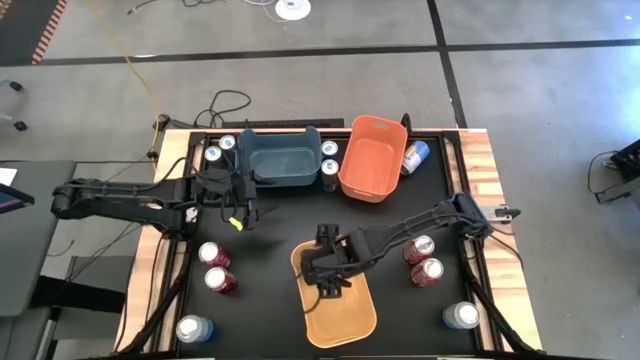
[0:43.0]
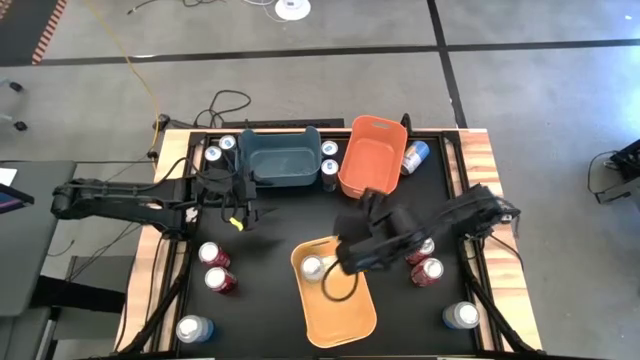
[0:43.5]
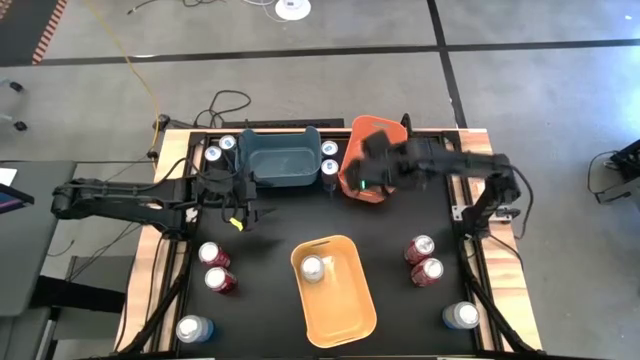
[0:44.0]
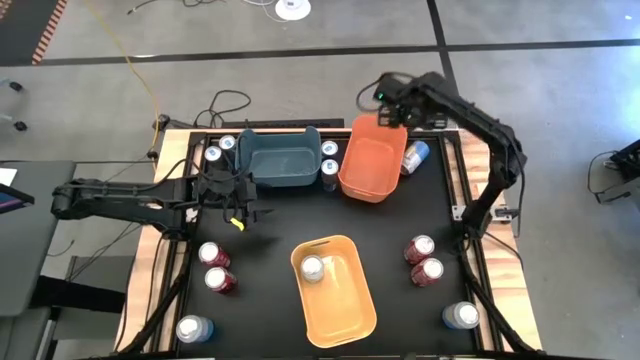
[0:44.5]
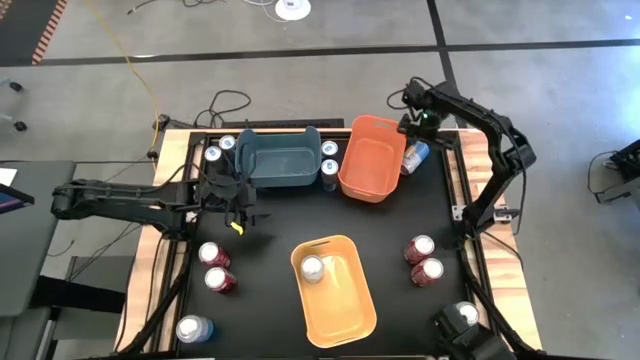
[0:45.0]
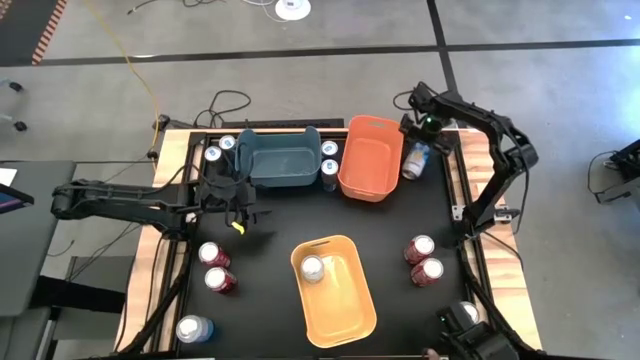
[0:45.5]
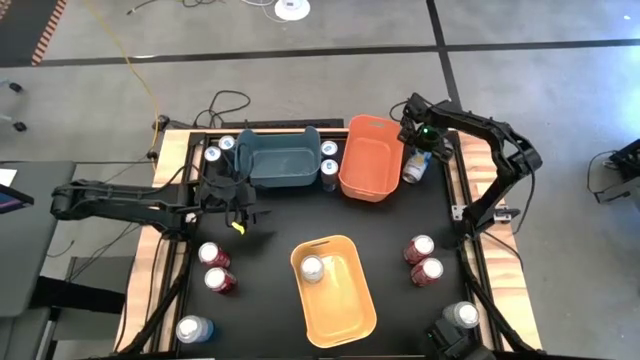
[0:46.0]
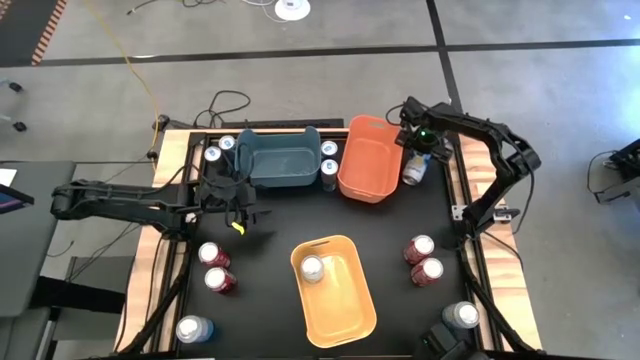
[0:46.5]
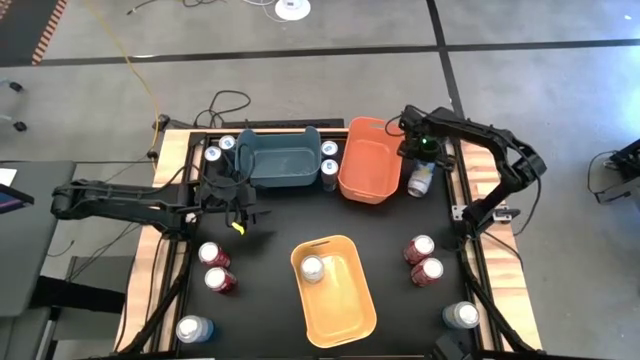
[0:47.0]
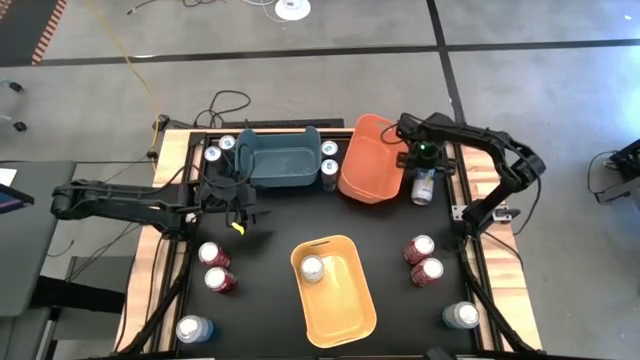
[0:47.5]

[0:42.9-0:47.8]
Task: Sort soda cans
Put the blue white soda can into the yellow bin

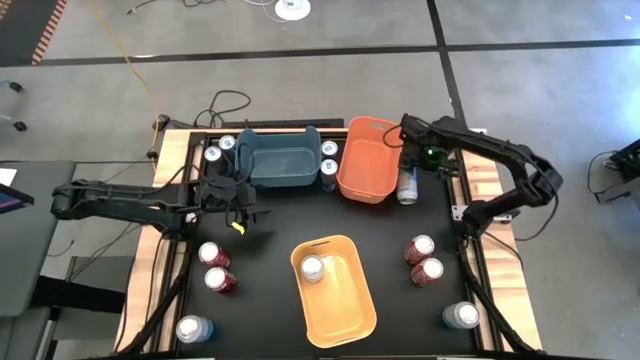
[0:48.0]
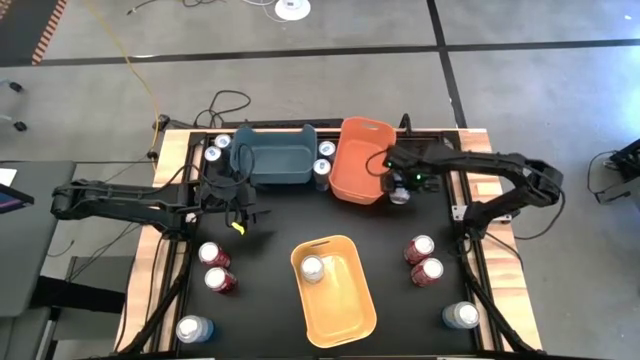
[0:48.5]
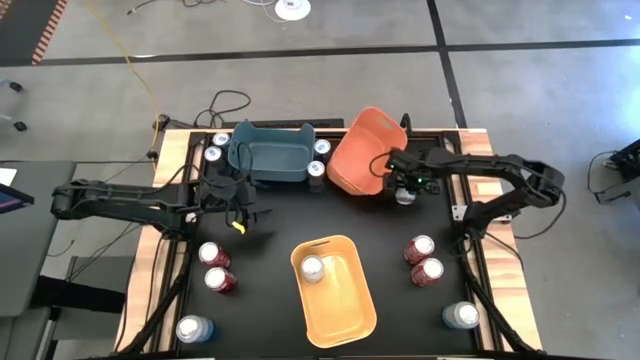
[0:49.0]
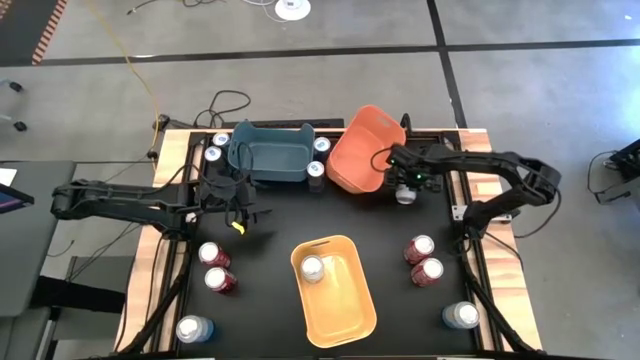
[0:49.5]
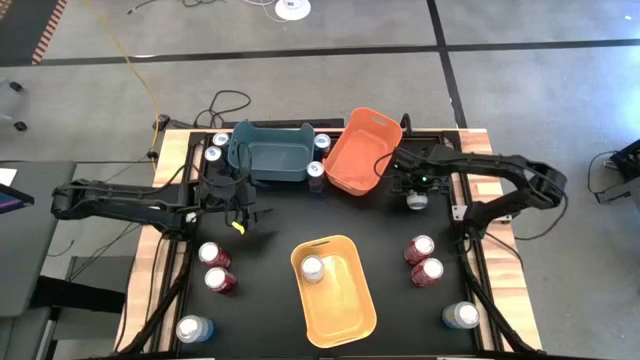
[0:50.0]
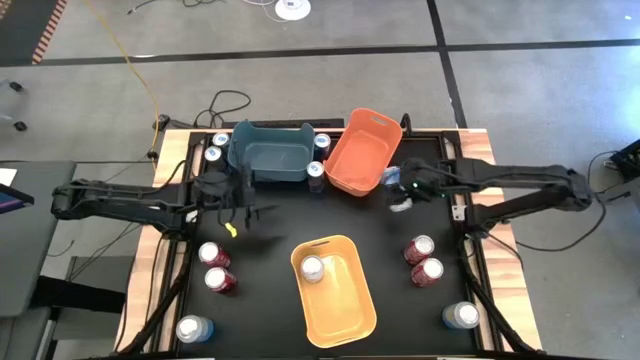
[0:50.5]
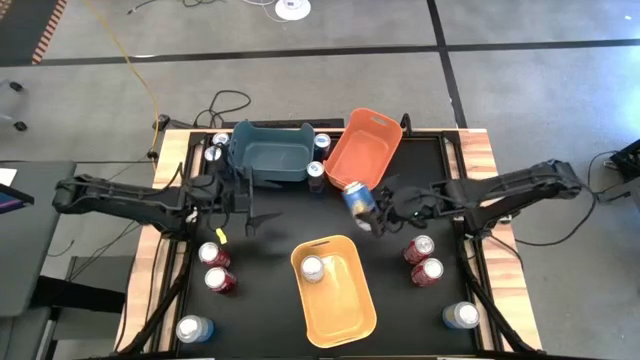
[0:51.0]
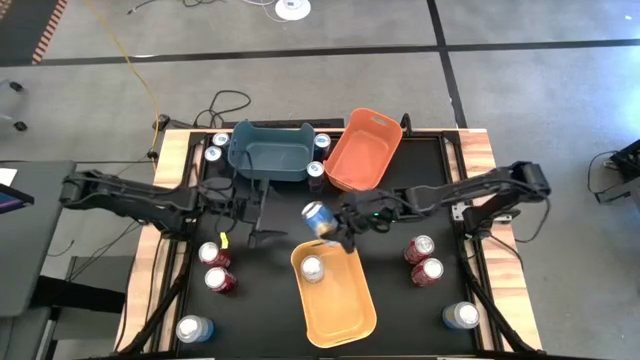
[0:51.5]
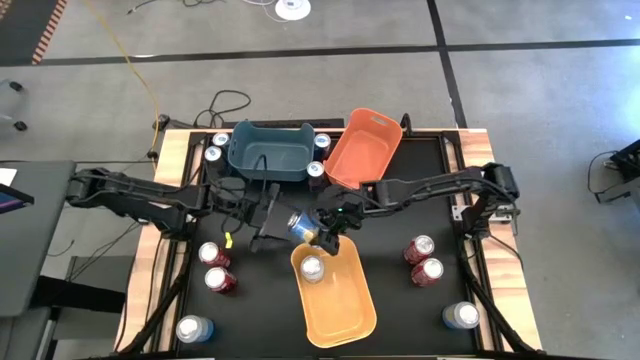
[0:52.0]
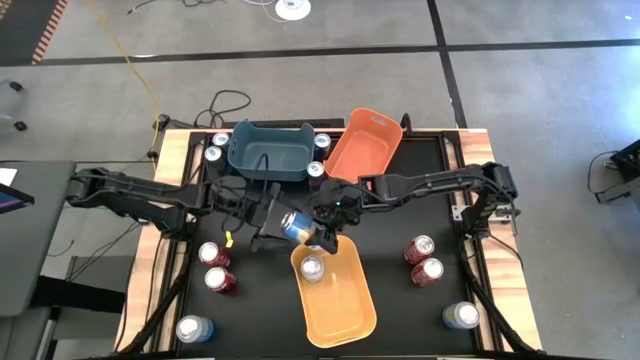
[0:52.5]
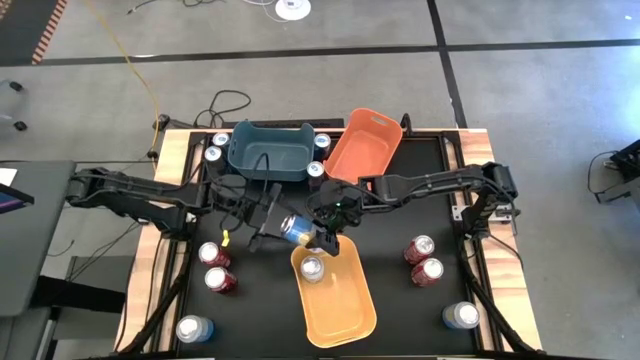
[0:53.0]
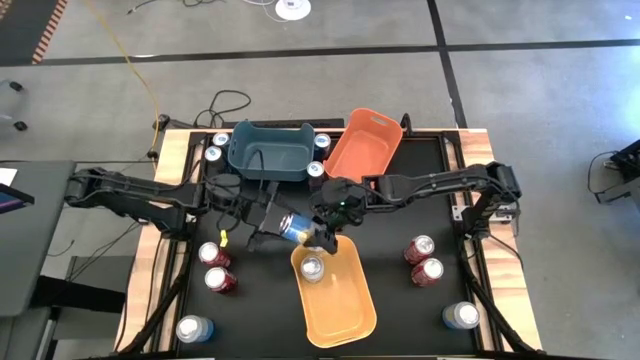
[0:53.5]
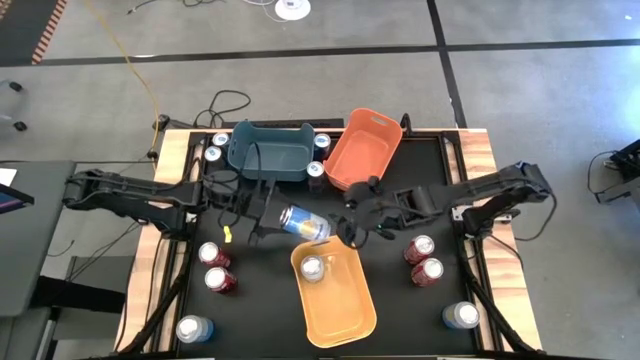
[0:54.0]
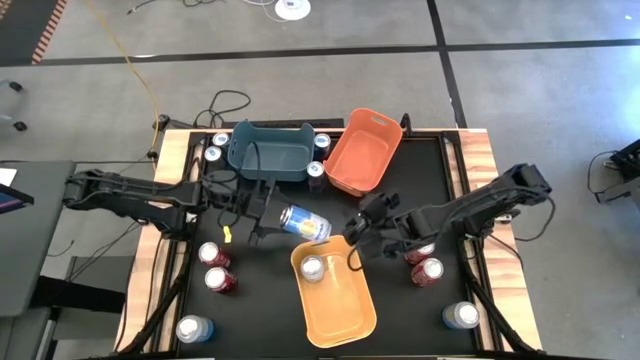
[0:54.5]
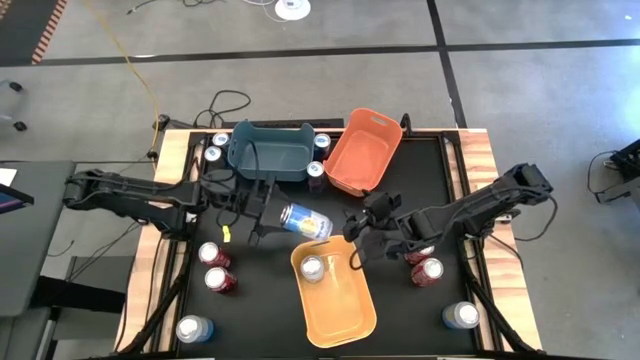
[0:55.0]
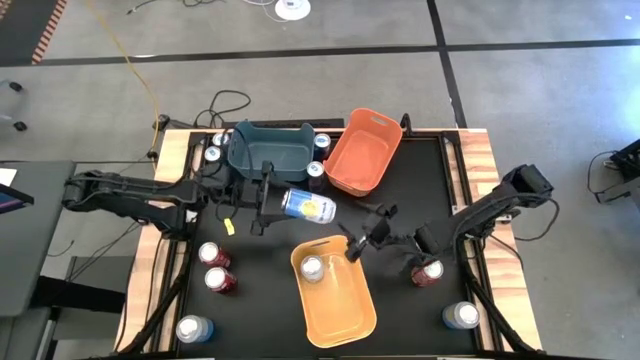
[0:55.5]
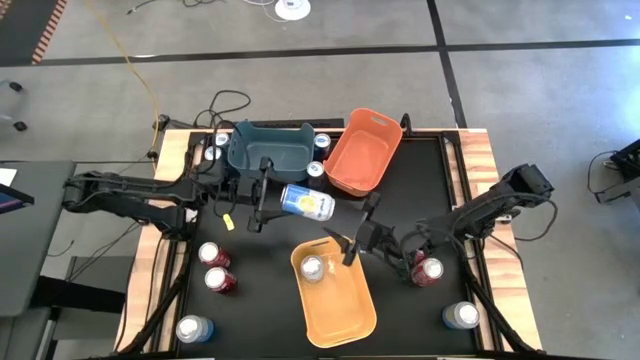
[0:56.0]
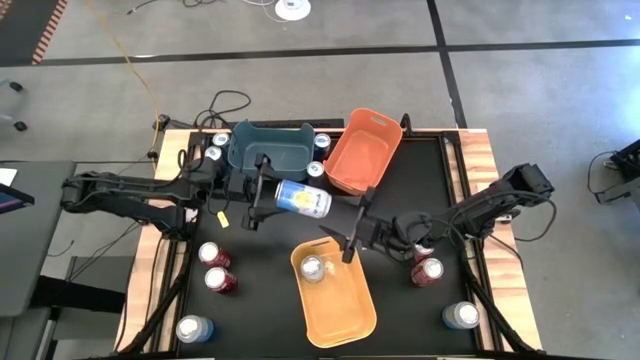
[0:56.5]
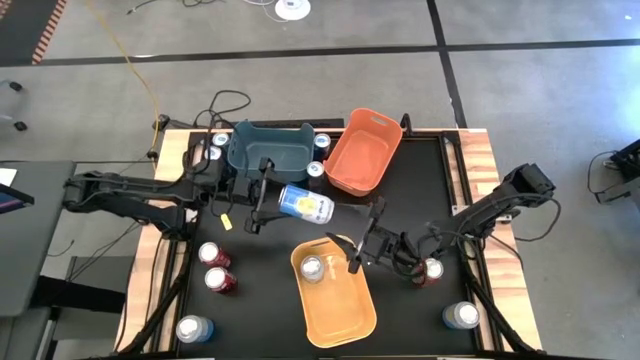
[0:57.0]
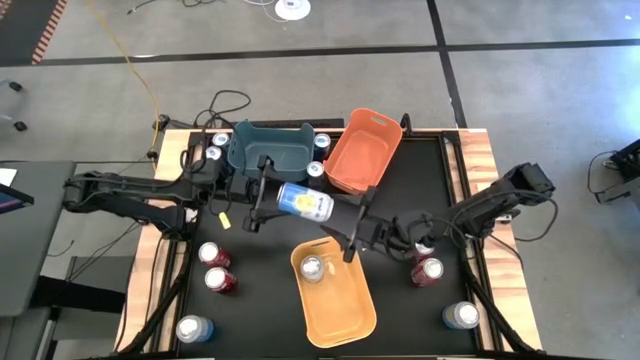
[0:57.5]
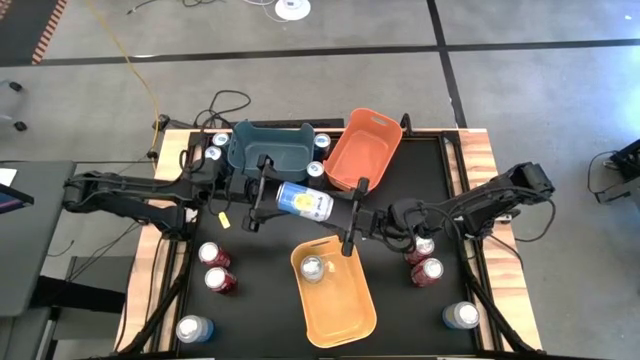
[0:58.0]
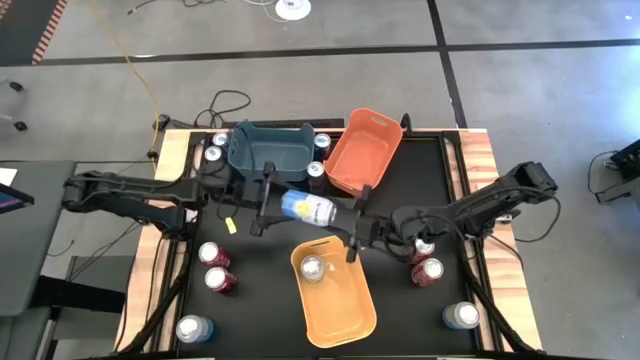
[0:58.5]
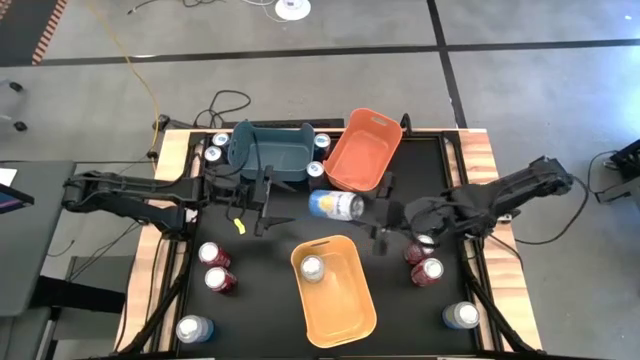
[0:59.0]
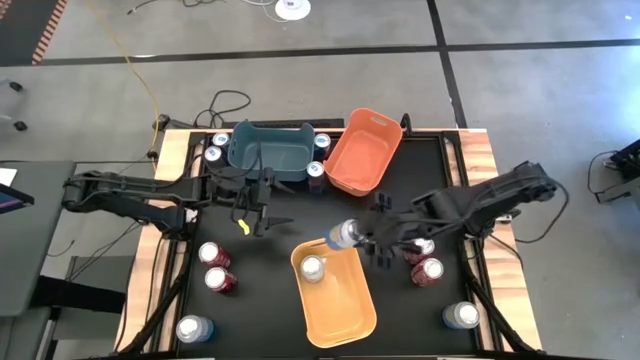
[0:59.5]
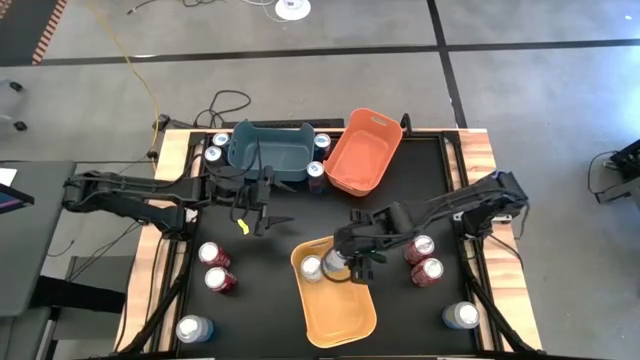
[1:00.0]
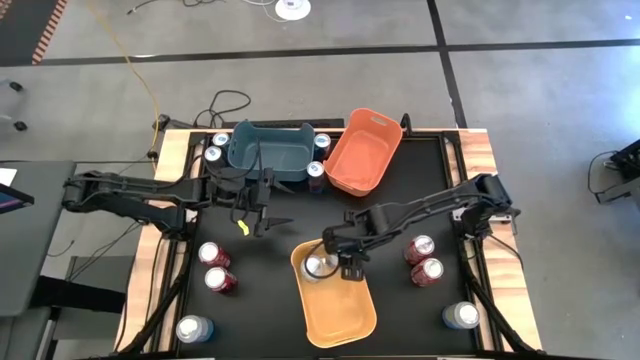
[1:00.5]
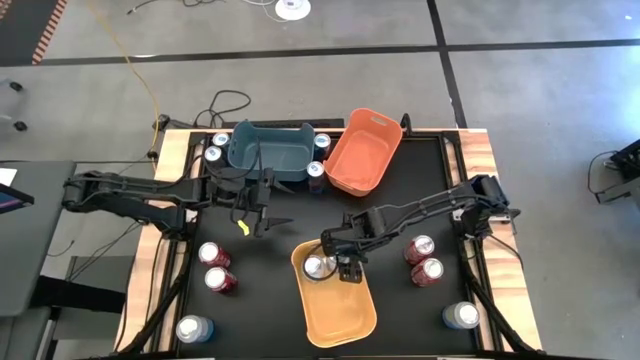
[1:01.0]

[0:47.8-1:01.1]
Put the blue white soda can into the yellow bin

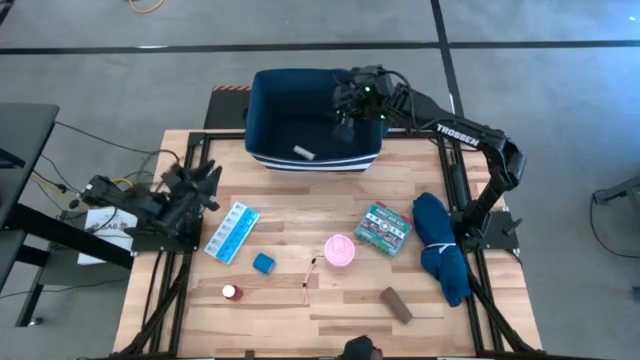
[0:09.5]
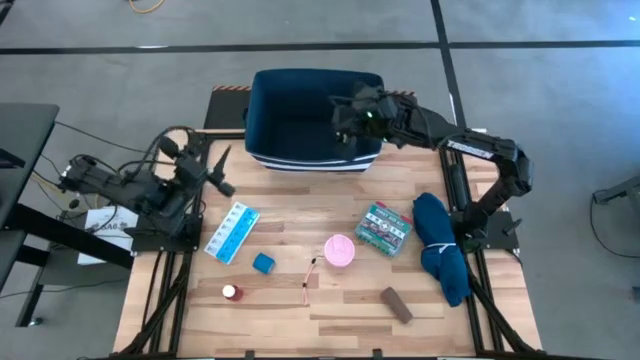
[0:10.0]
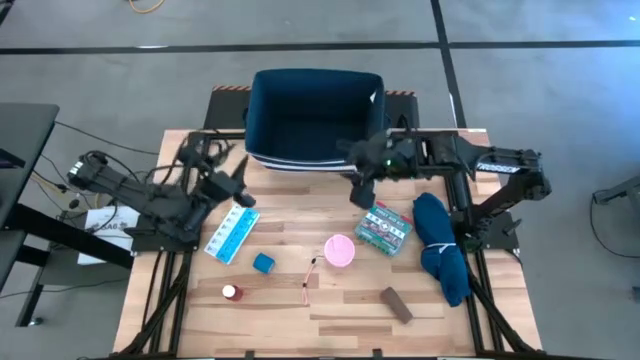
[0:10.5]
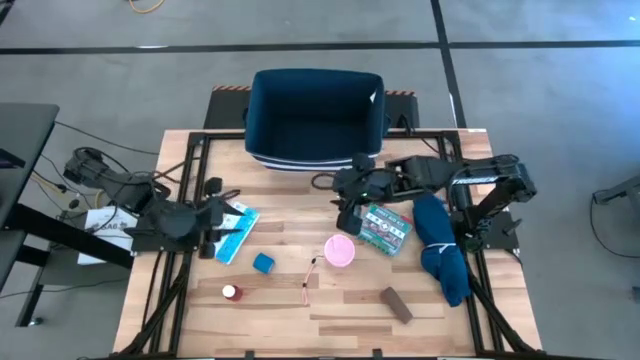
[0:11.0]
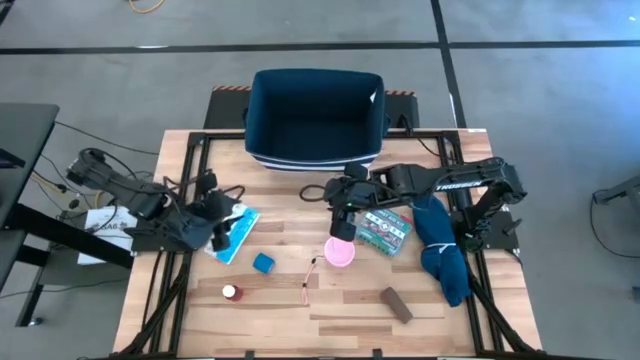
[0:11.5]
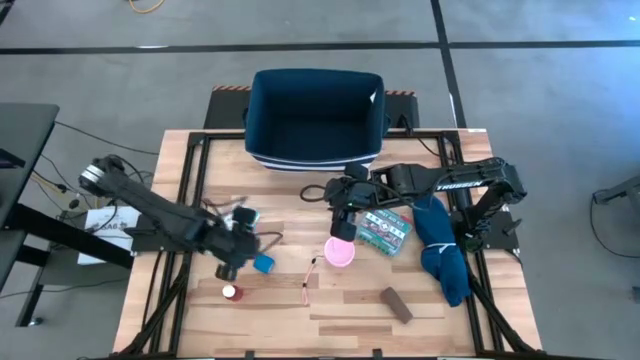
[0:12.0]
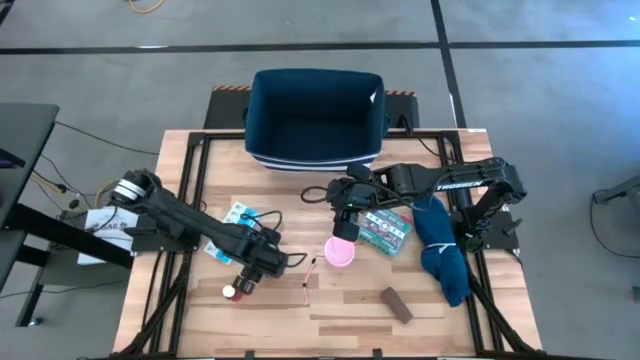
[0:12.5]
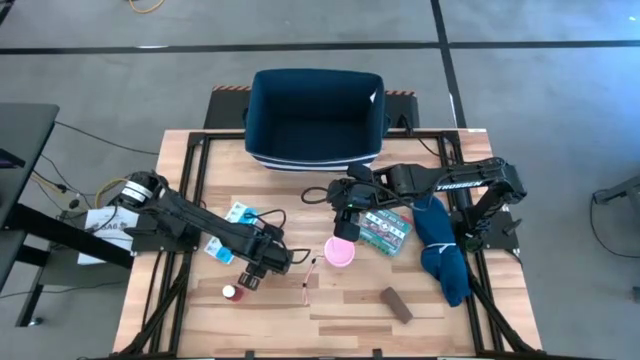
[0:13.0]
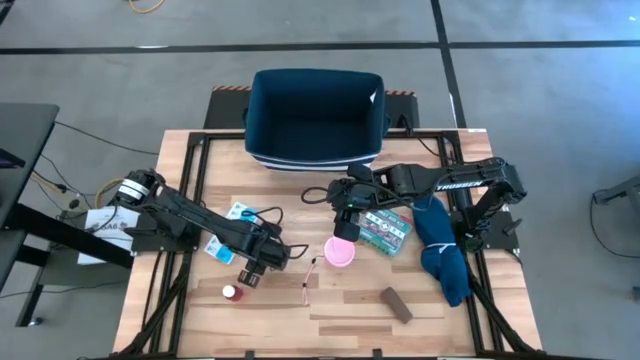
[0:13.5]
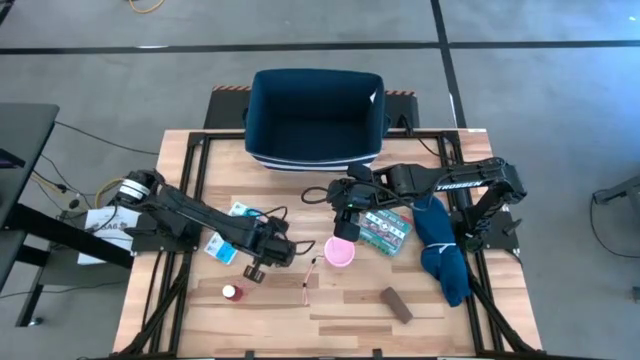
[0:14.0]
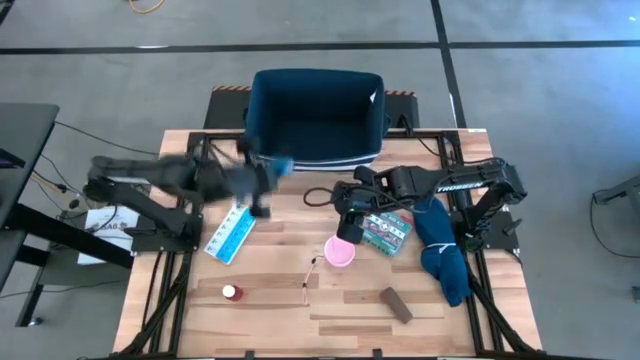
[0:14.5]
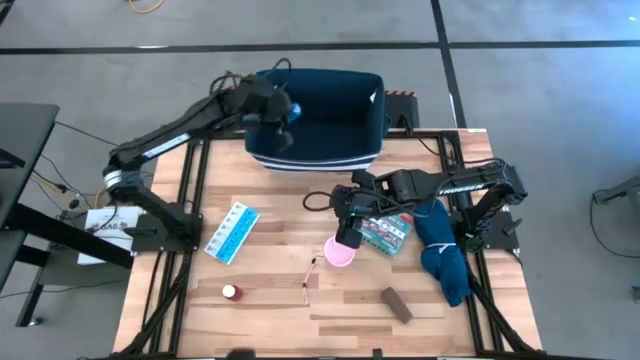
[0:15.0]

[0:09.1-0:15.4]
Task: Pick & place medical supplies in basket/bin
Put the blue bandage in the blue bin
